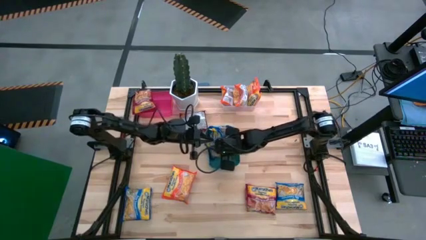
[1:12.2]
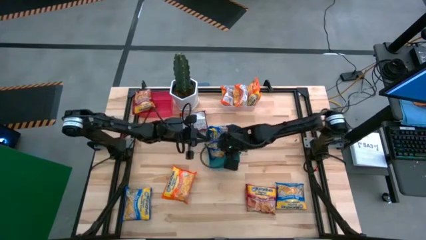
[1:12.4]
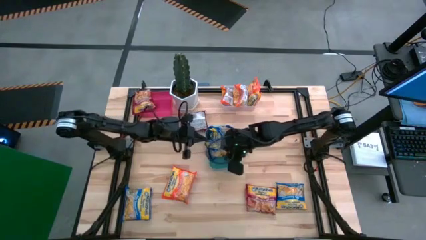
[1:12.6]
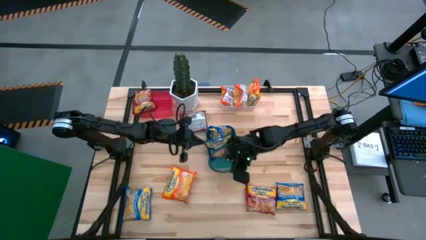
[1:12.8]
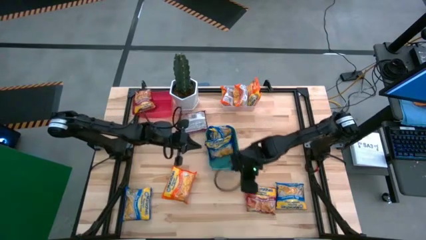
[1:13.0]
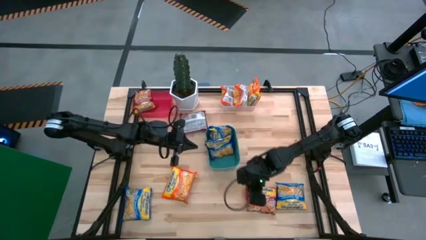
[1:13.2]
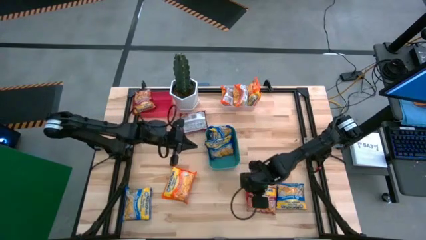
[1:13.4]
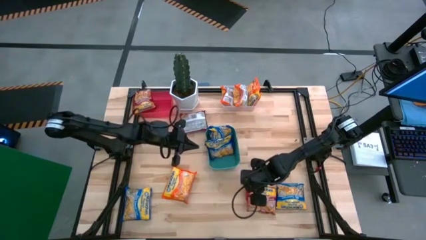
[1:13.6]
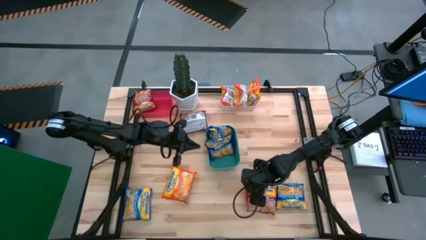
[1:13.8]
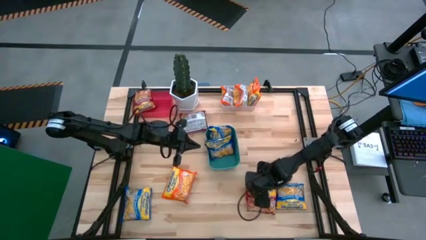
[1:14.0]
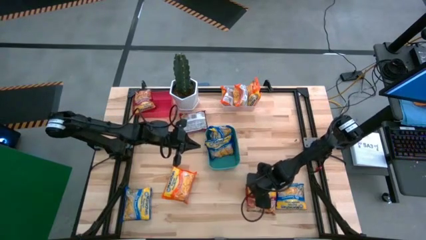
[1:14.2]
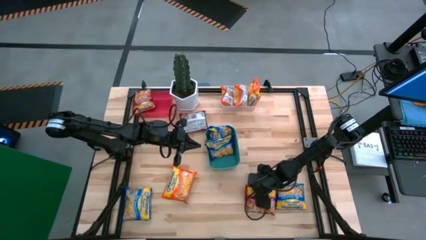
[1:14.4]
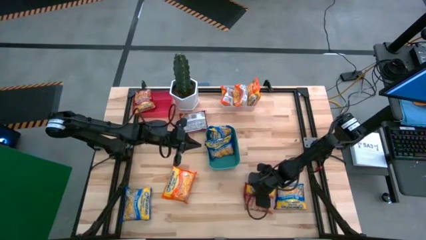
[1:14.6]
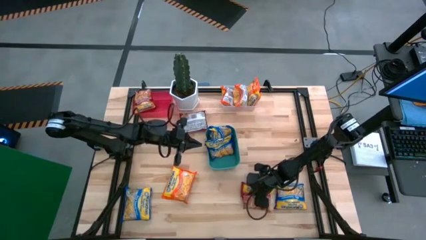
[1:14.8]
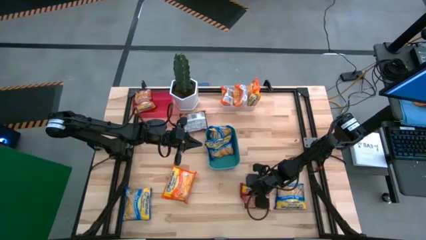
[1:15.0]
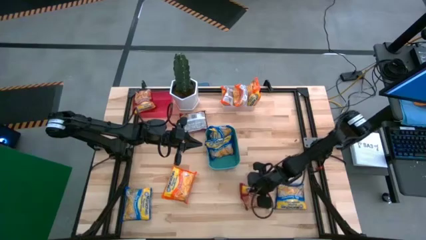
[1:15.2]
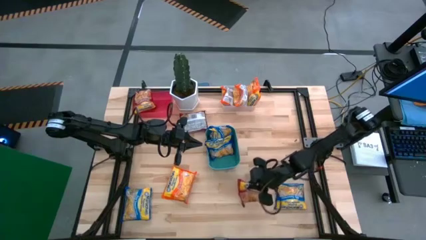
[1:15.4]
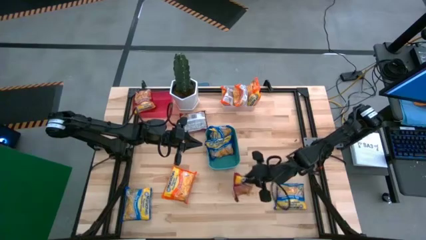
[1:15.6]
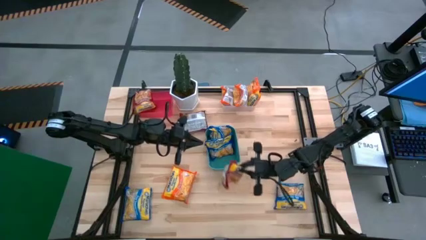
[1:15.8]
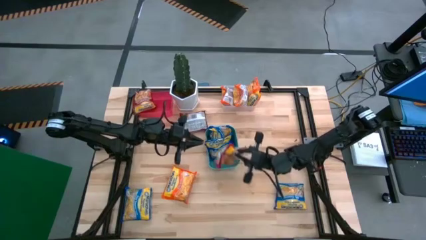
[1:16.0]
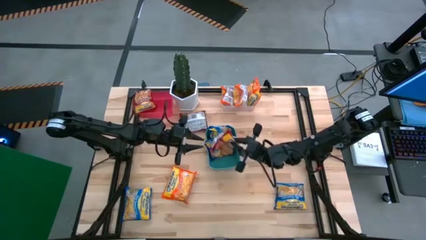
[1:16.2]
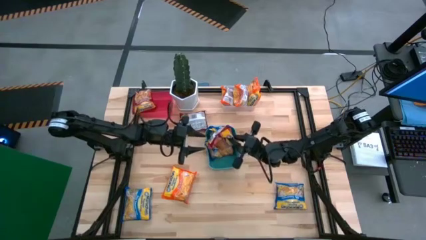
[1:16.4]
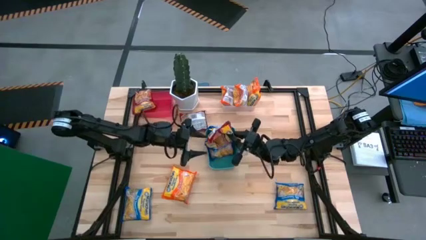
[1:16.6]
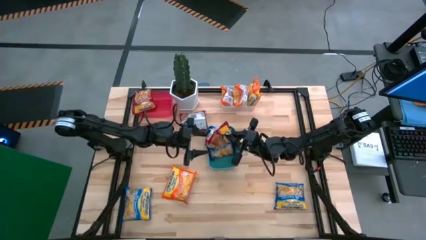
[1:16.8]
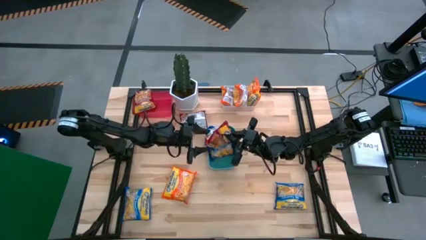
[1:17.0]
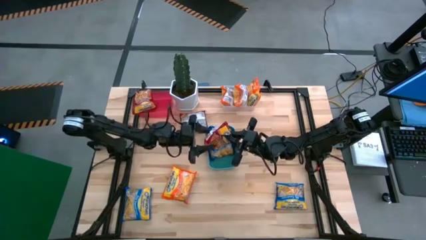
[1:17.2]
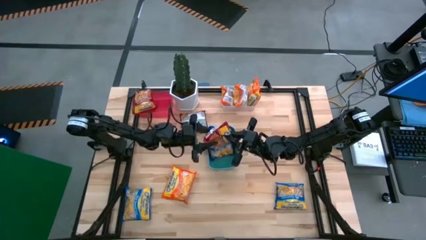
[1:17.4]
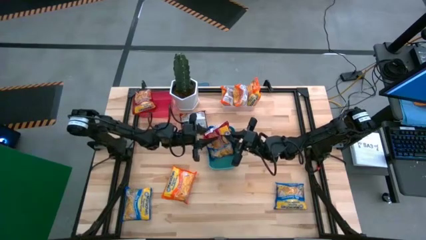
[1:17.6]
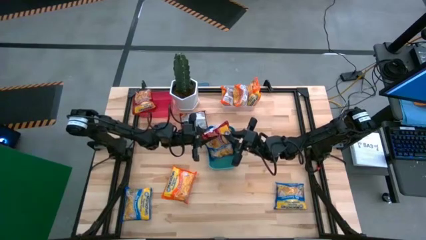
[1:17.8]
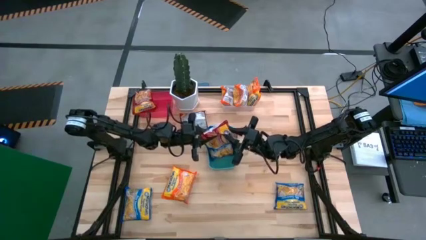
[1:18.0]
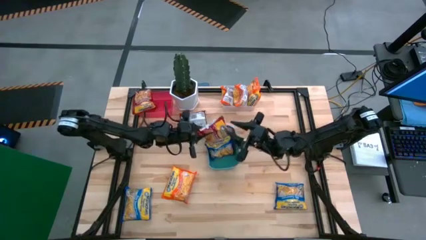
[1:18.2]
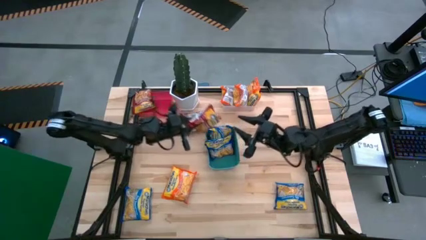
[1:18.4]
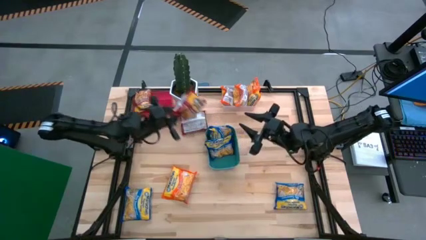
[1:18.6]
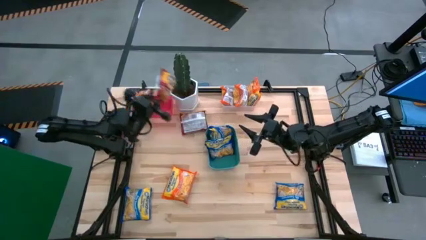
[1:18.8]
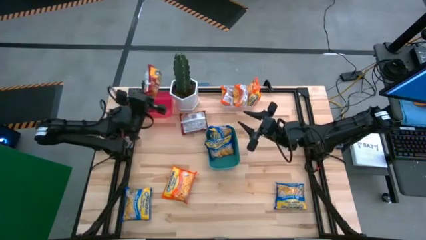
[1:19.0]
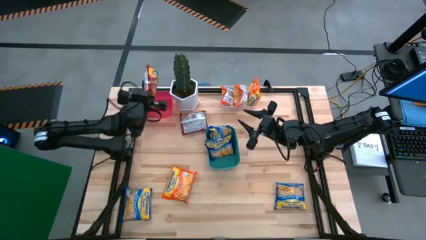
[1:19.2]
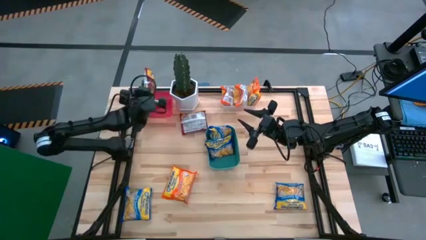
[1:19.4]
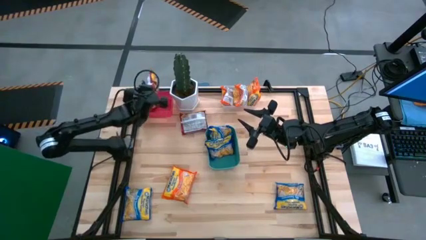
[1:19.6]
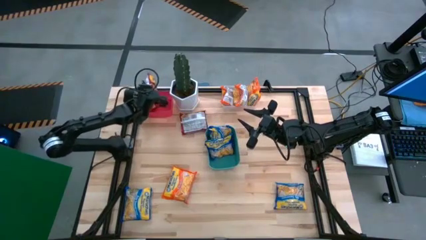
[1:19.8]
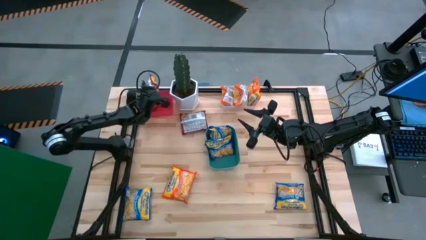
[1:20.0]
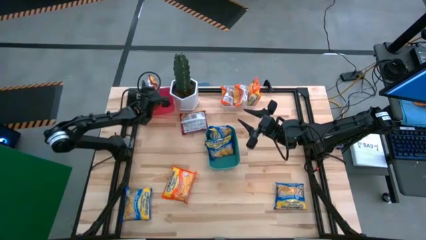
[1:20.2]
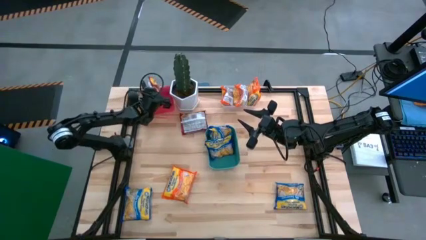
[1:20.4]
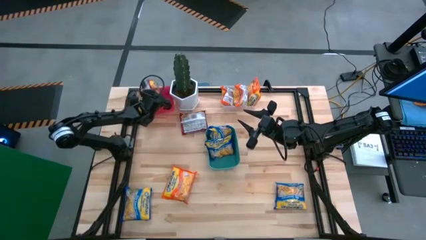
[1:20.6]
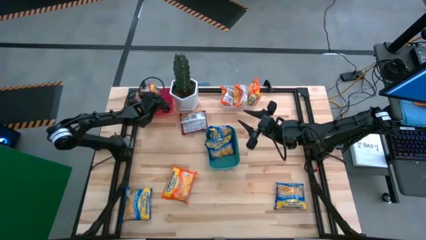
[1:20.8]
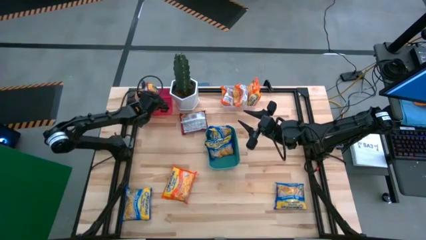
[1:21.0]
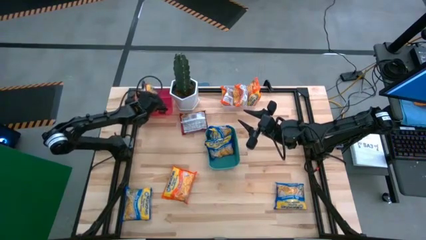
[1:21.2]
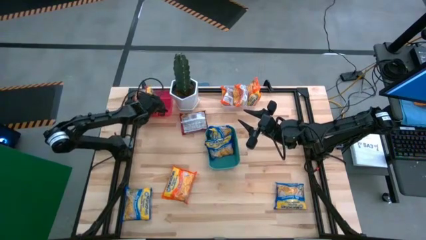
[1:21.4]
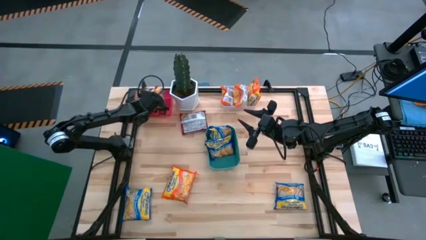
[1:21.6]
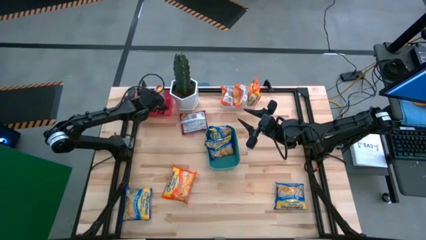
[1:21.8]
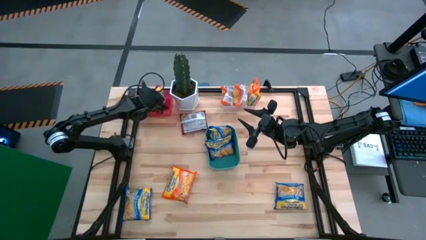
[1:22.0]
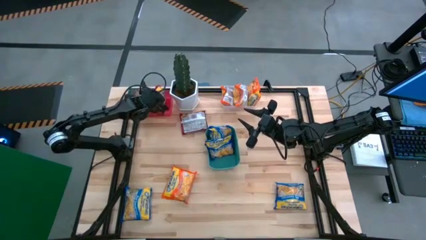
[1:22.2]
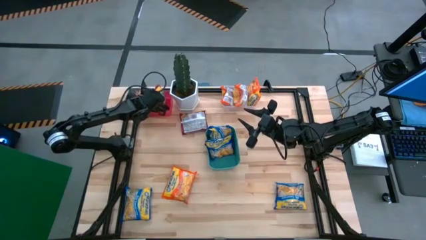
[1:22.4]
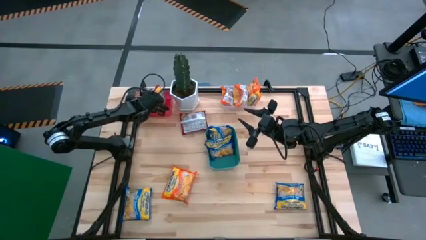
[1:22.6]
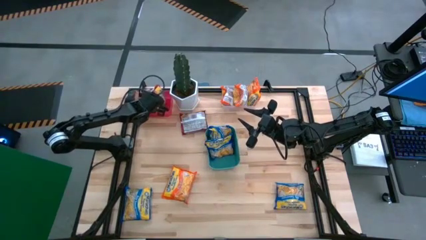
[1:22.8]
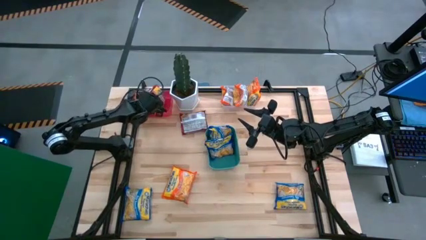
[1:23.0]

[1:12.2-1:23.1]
Task: Sort Maruchan noodles
Put the red noodle pack into the pink bin

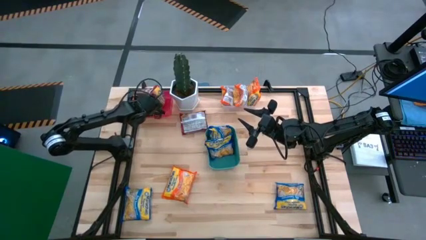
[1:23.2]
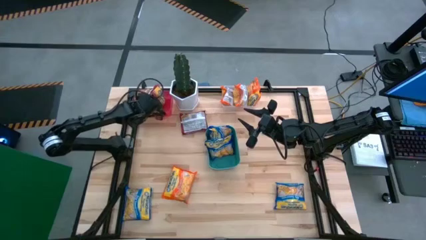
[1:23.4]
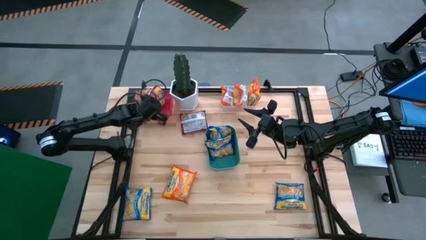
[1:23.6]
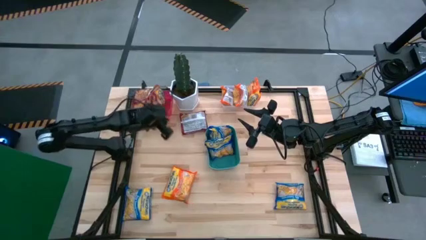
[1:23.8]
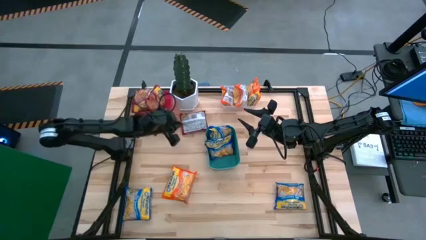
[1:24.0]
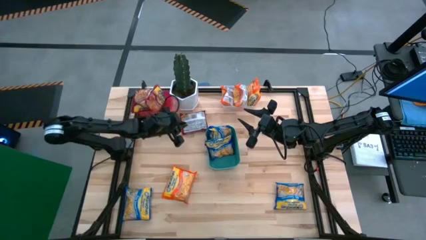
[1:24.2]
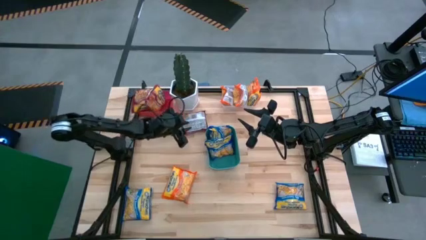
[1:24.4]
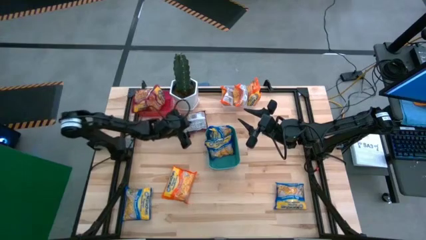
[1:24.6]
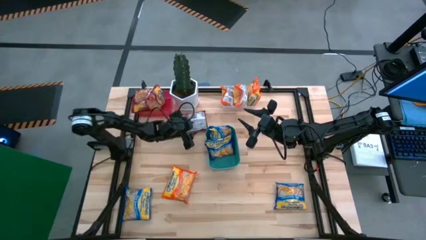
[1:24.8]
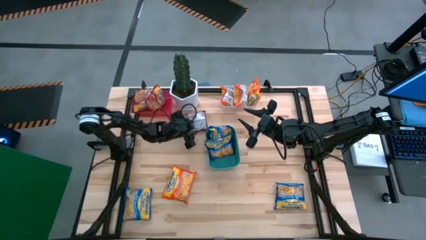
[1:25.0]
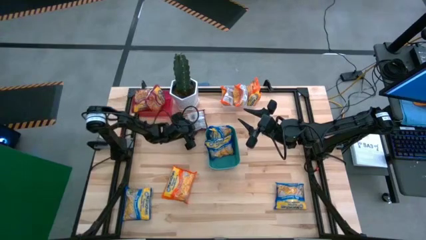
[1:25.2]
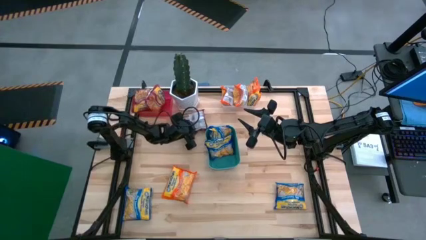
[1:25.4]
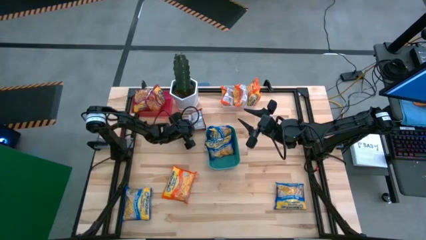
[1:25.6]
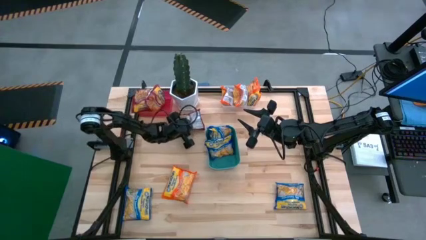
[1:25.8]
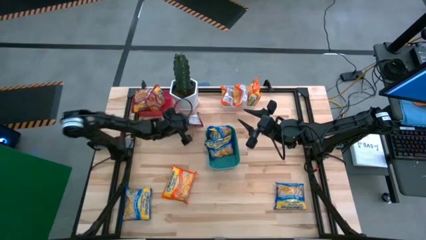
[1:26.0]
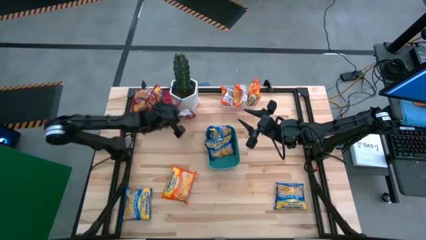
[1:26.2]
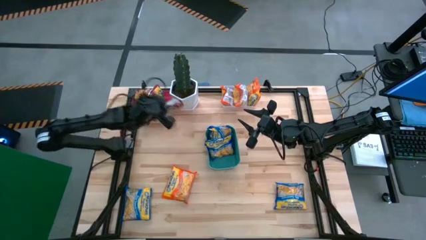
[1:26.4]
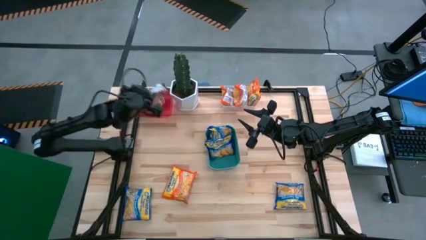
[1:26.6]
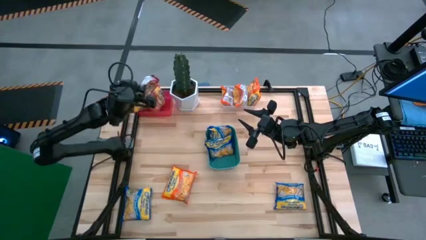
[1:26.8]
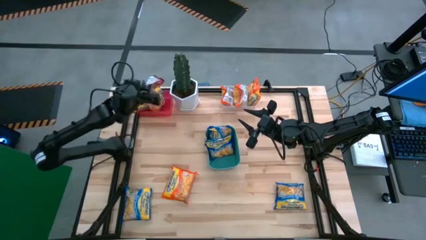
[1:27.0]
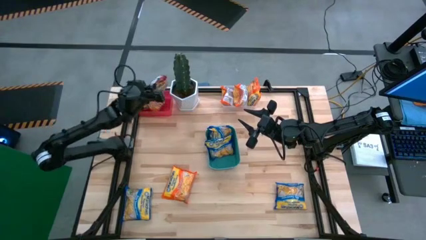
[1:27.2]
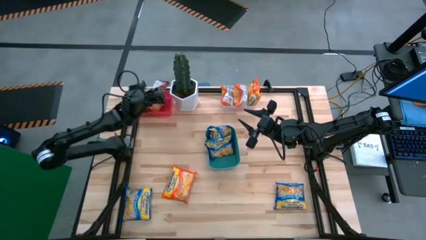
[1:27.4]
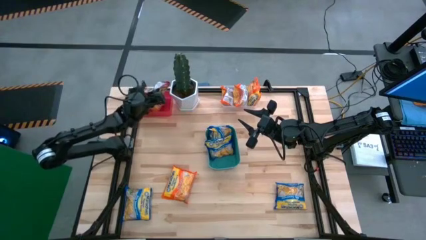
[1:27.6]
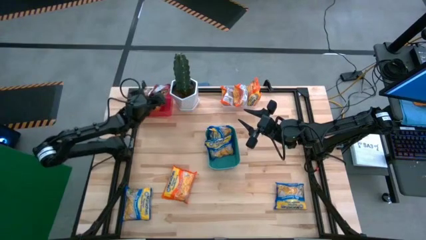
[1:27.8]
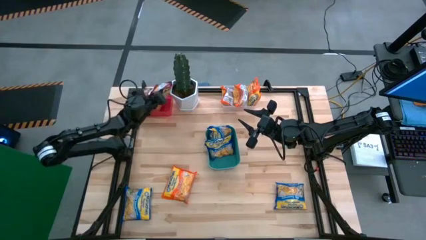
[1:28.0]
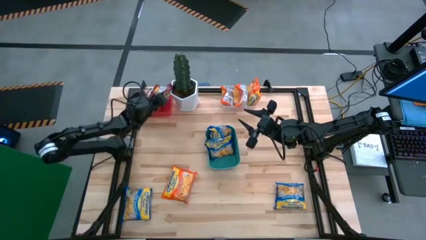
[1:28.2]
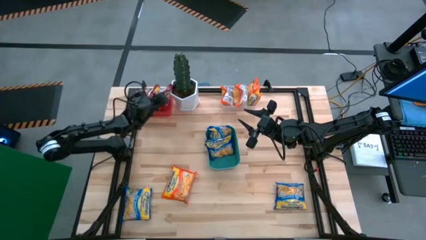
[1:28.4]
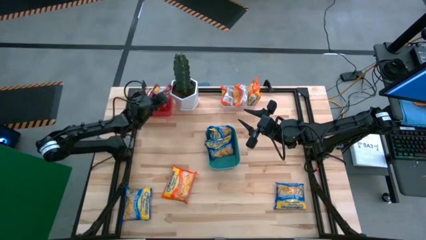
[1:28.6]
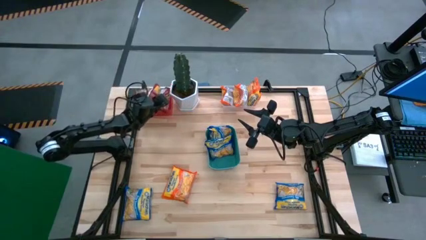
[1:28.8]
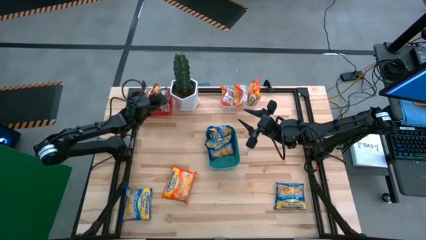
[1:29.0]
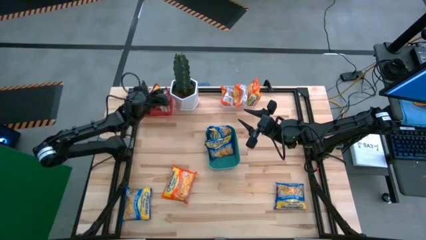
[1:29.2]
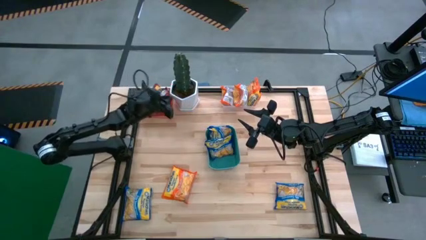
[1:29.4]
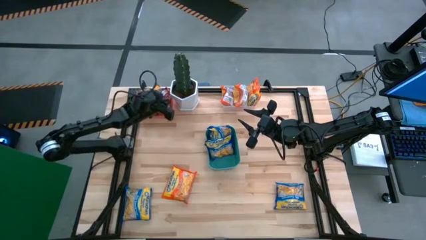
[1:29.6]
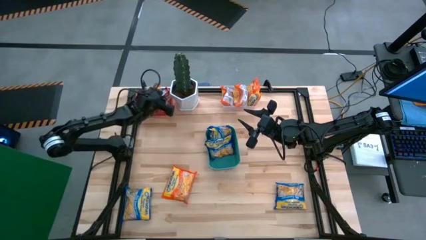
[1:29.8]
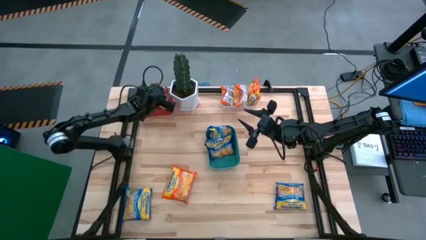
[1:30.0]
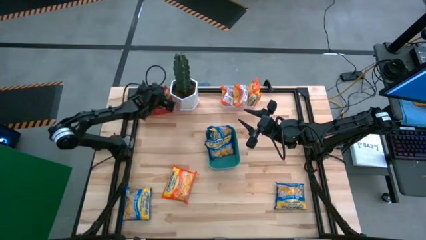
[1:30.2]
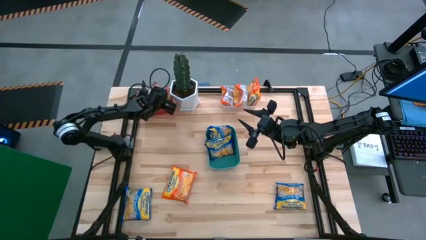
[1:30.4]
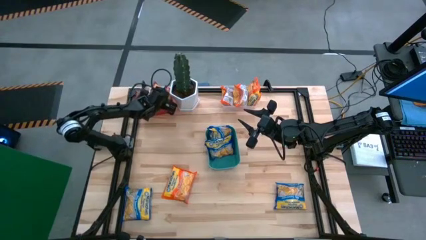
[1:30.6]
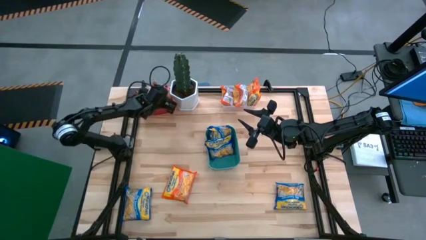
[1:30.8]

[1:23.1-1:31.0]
Put the red noodle pack into the pink bin
